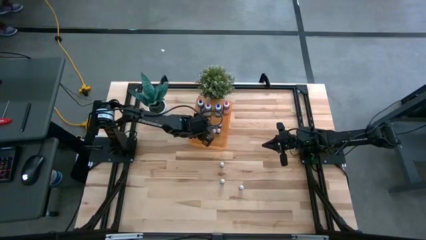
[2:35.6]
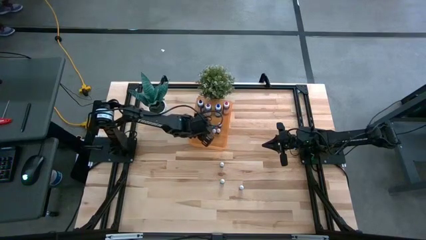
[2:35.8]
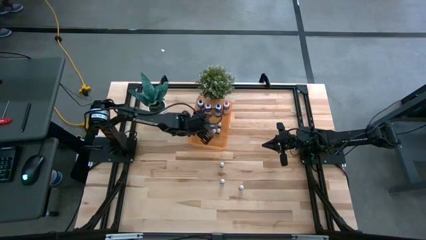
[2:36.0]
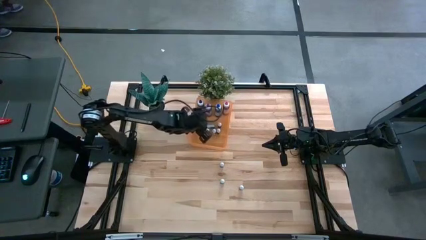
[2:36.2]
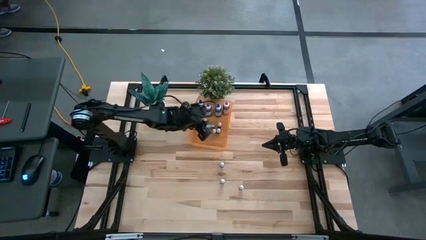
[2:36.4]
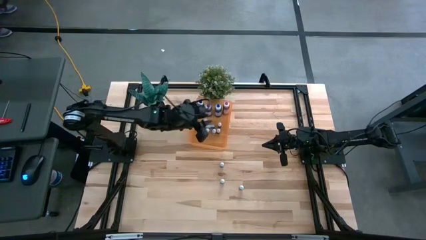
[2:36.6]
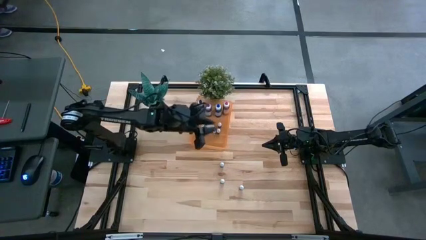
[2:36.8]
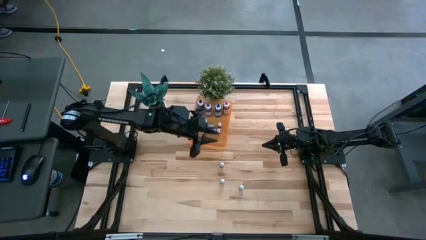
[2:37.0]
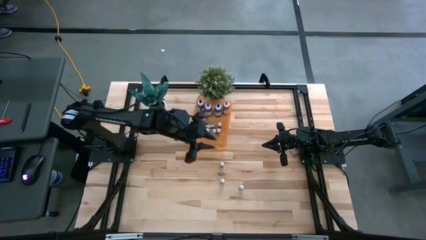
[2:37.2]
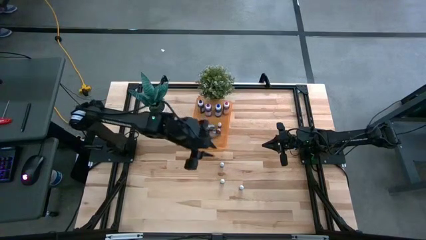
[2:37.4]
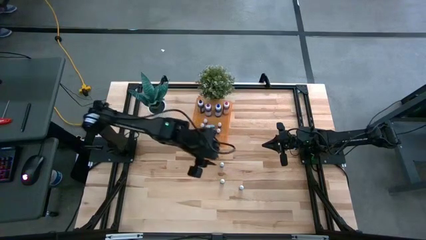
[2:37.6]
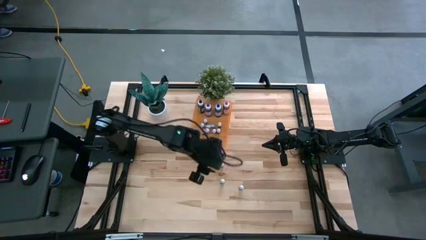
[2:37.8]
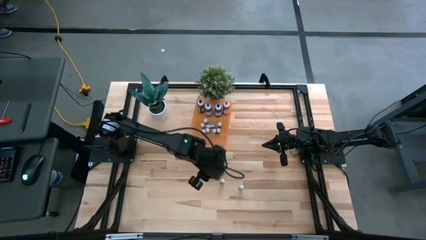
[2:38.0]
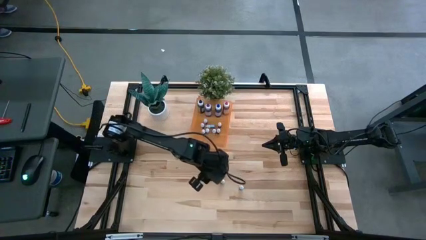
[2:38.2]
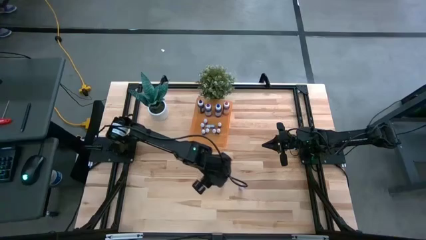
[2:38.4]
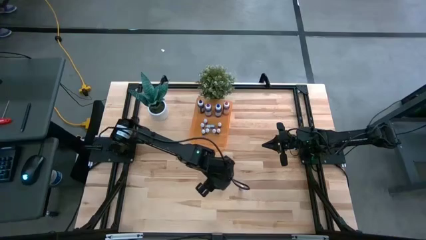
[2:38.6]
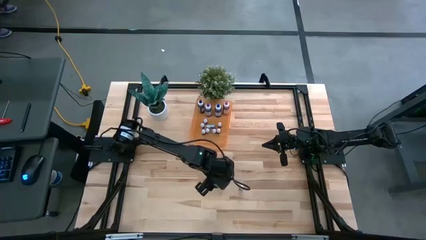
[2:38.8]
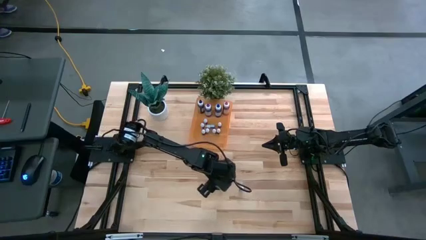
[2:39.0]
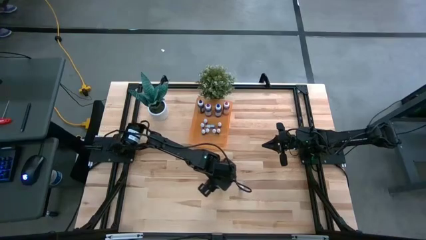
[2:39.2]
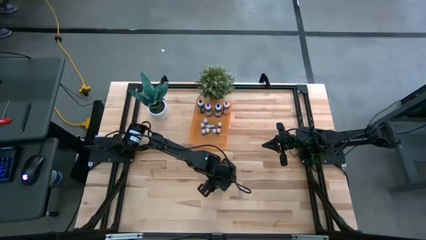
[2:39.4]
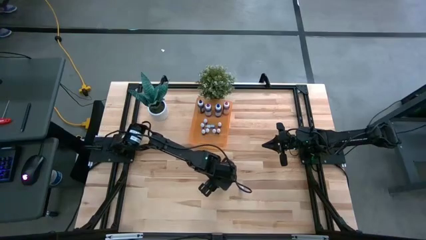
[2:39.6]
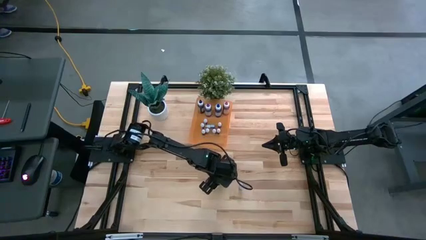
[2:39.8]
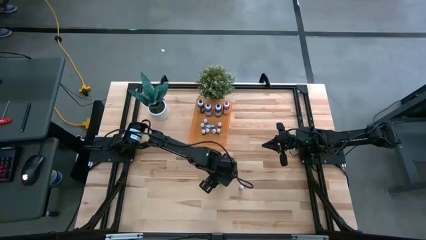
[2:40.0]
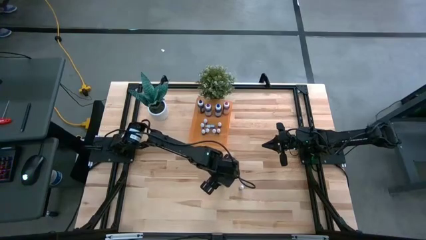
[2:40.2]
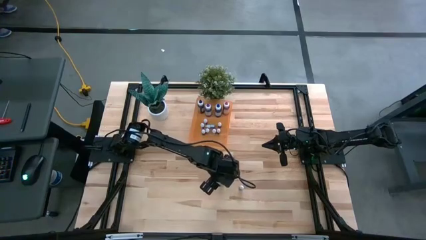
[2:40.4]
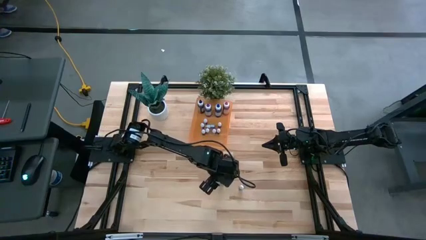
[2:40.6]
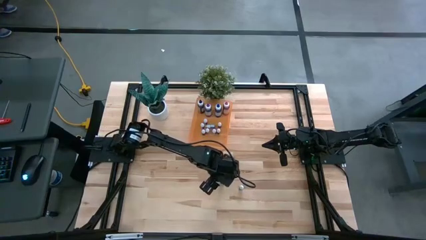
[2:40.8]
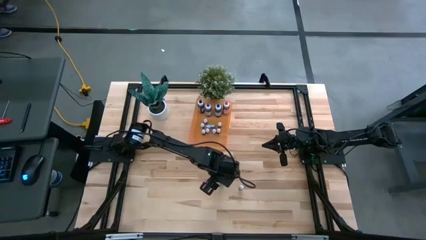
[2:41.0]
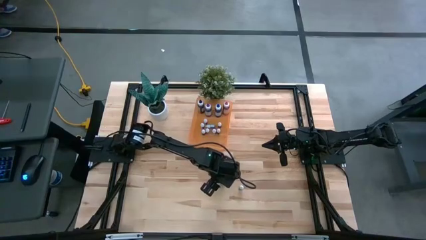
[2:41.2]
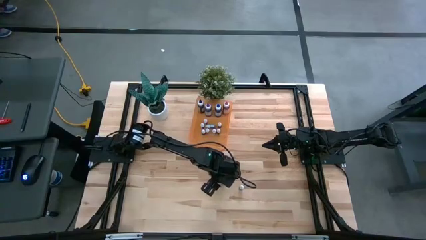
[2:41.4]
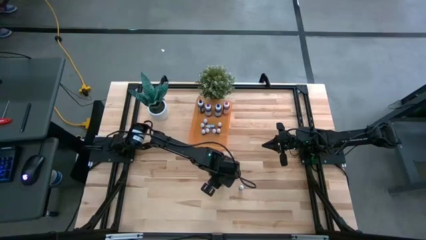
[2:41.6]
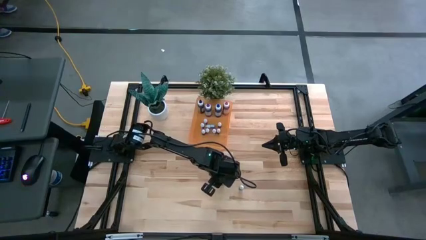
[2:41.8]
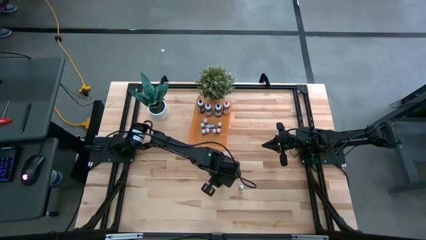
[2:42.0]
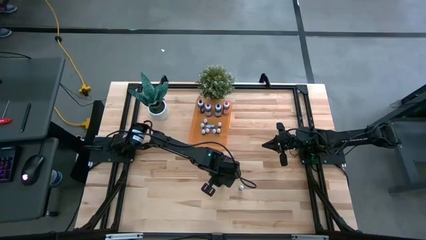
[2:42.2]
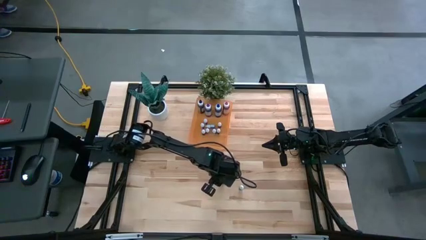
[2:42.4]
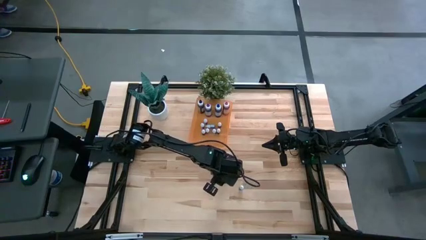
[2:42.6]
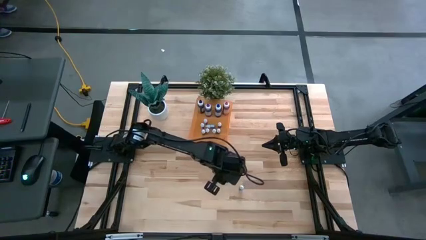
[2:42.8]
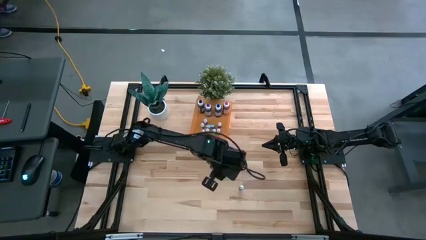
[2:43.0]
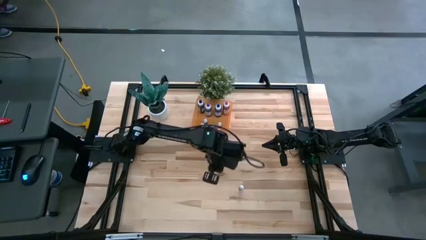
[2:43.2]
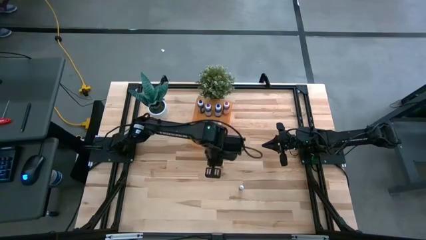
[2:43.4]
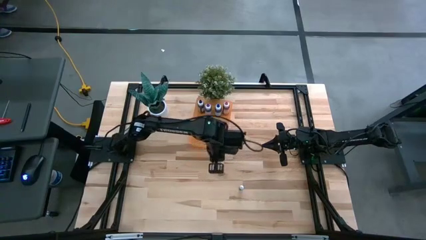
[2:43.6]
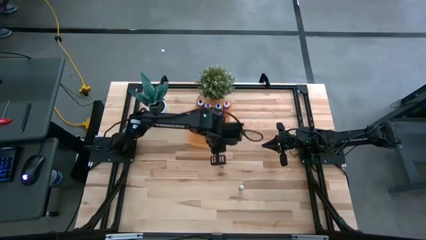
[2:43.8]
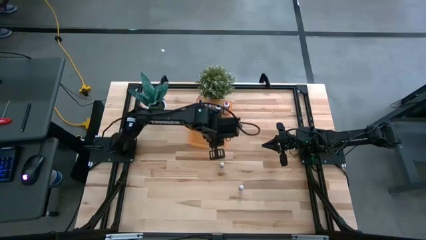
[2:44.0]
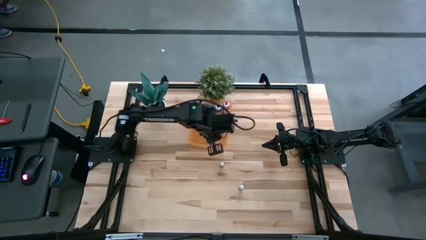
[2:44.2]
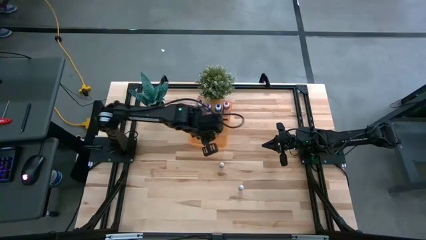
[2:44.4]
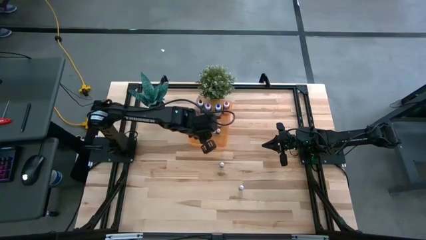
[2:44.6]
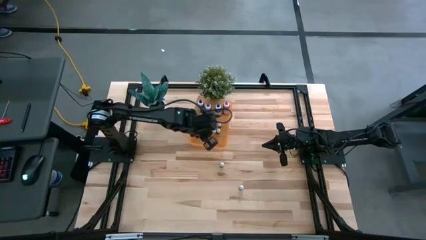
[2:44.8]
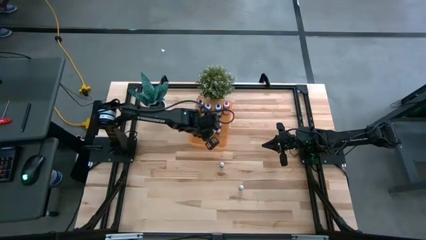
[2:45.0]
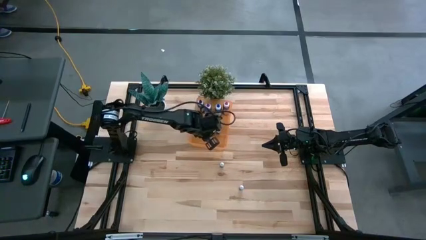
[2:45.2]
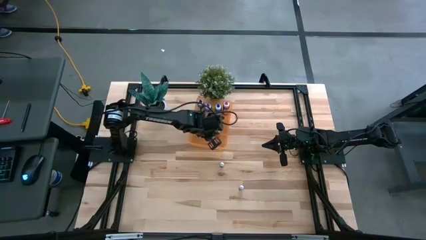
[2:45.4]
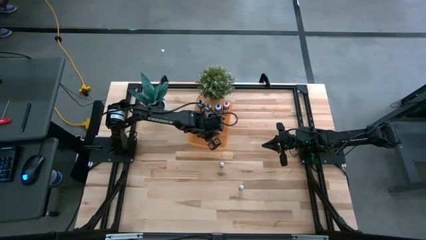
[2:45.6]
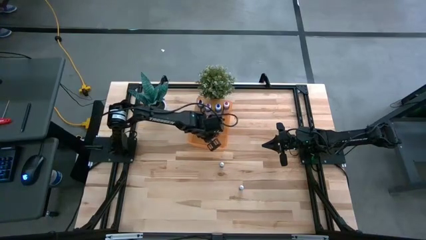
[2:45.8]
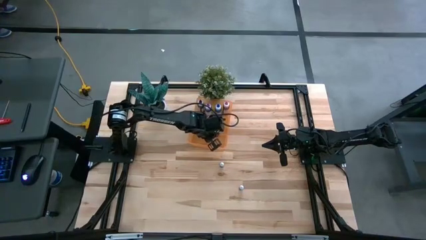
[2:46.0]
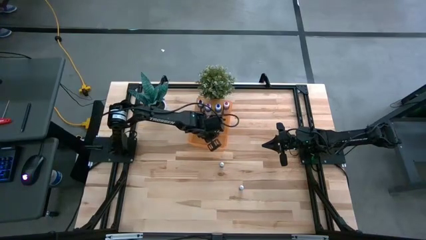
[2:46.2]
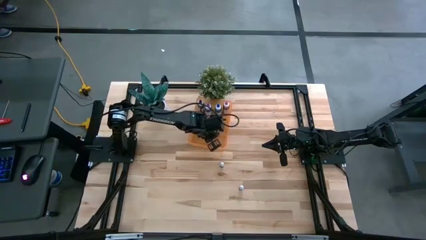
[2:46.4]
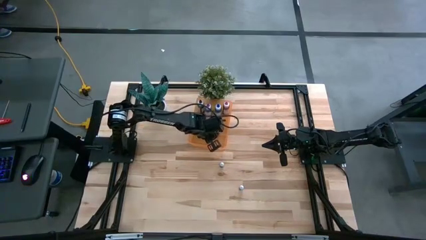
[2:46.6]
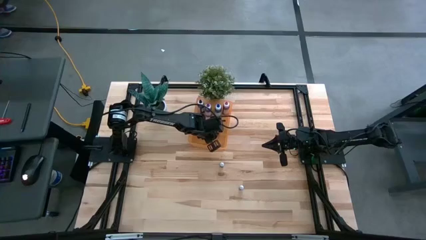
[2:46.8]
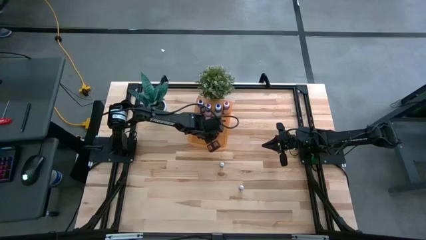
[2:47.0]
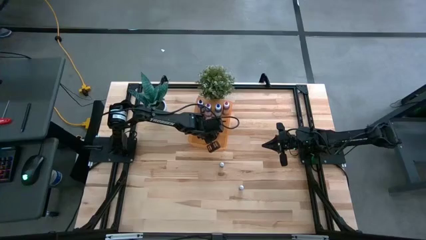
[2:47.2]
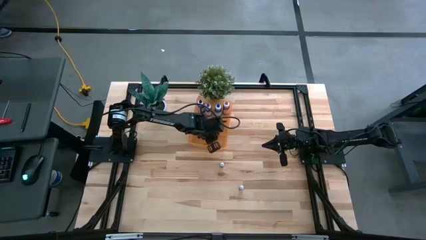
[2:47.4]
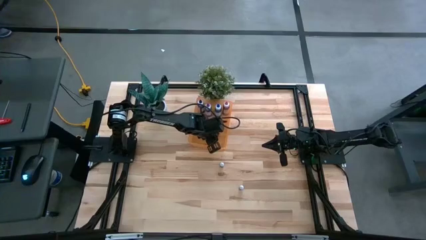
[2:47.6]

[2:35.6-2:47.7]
Task: Pick & Place food coloring
Put the small dark green food coloring bottle into the orange bin
